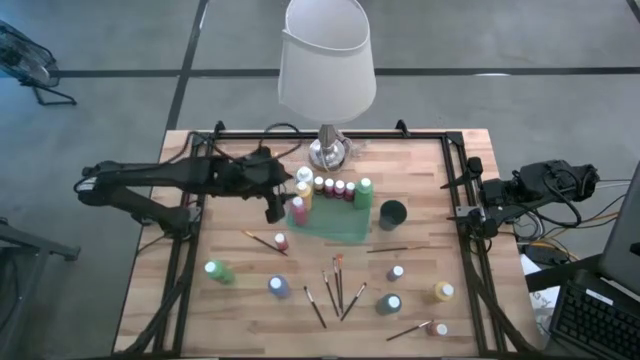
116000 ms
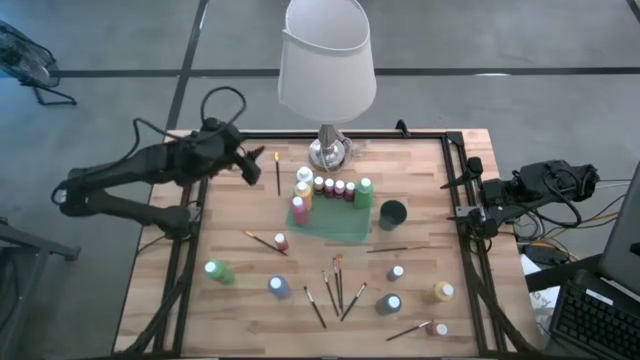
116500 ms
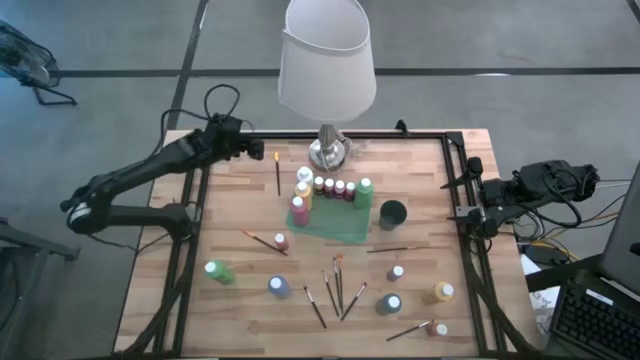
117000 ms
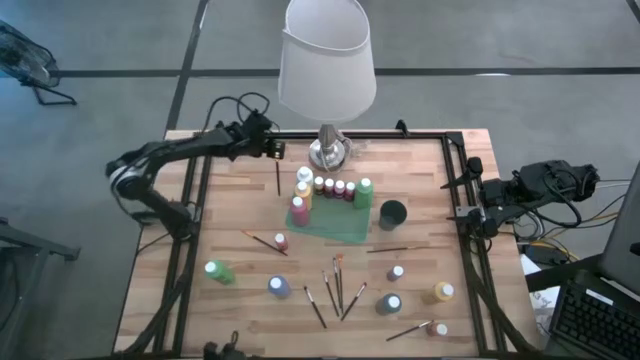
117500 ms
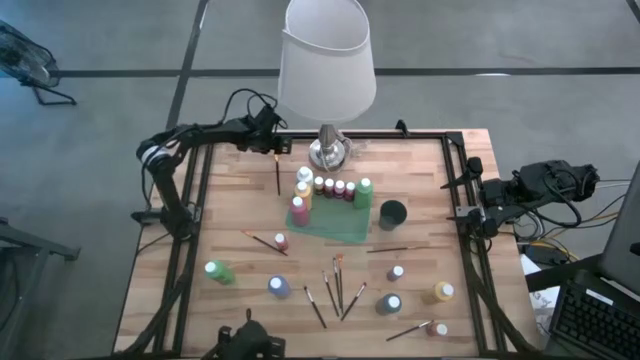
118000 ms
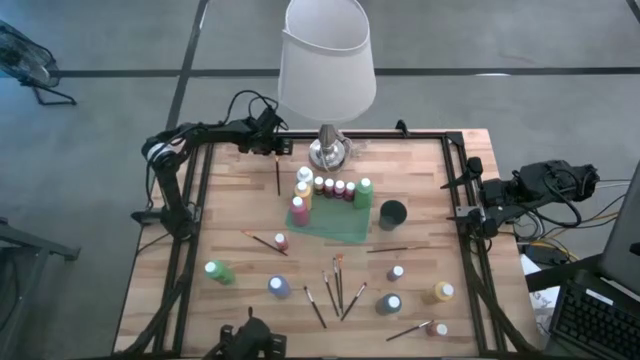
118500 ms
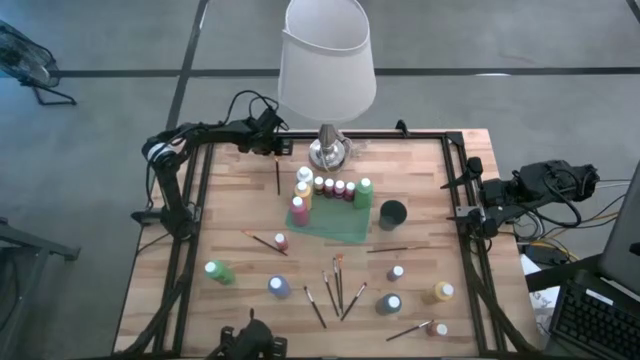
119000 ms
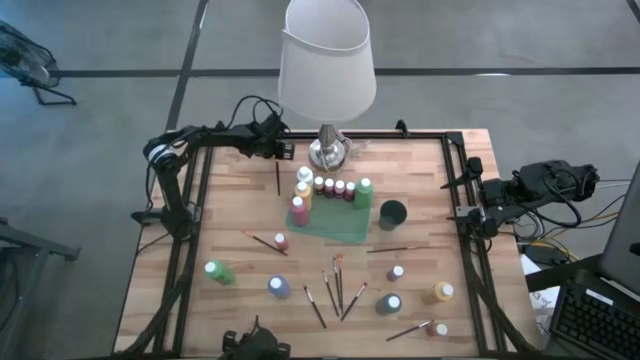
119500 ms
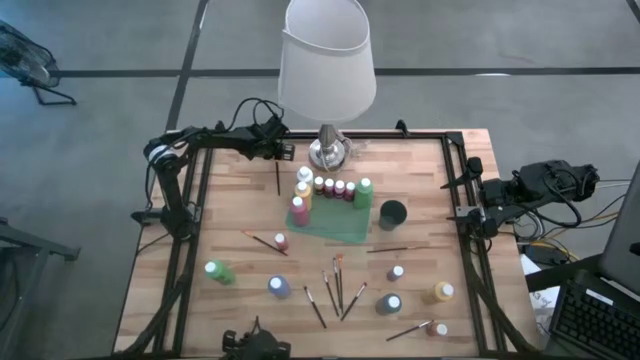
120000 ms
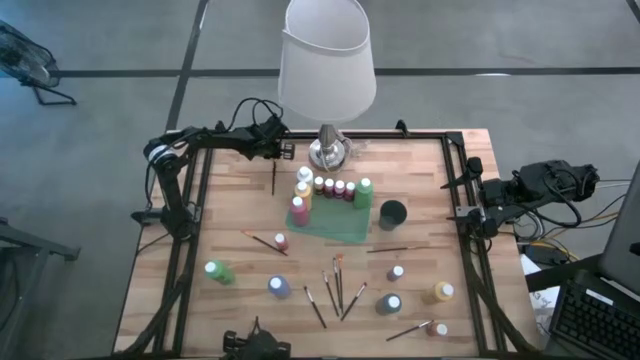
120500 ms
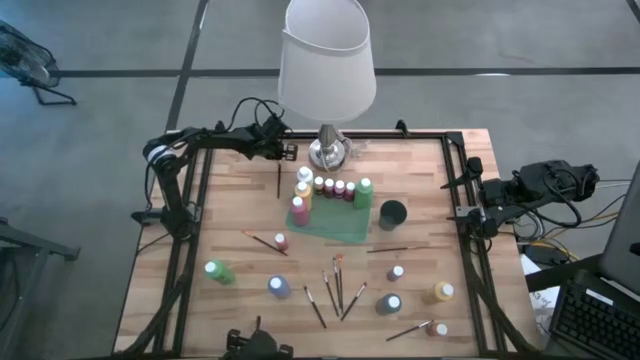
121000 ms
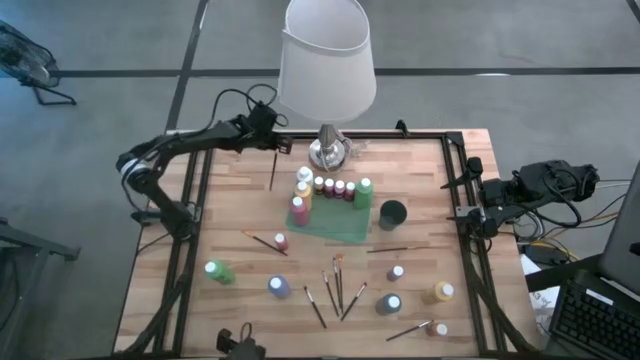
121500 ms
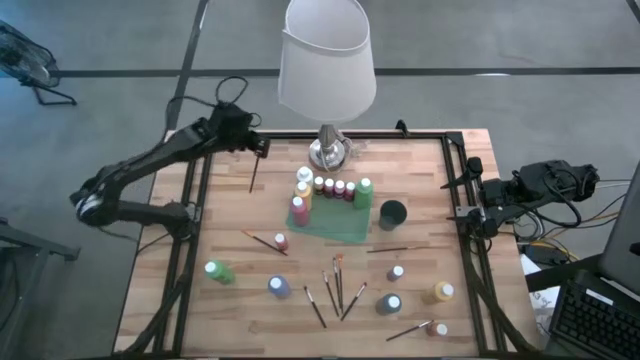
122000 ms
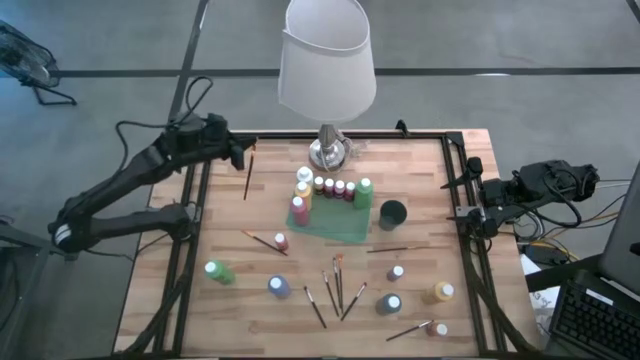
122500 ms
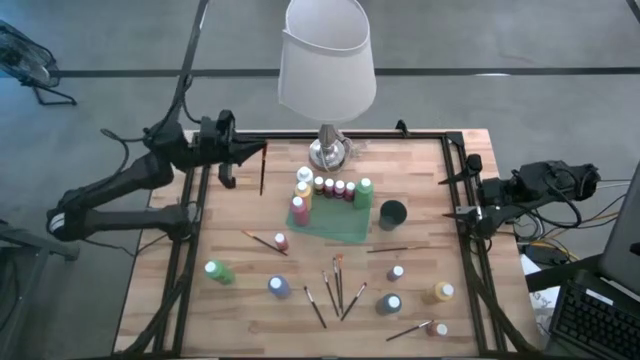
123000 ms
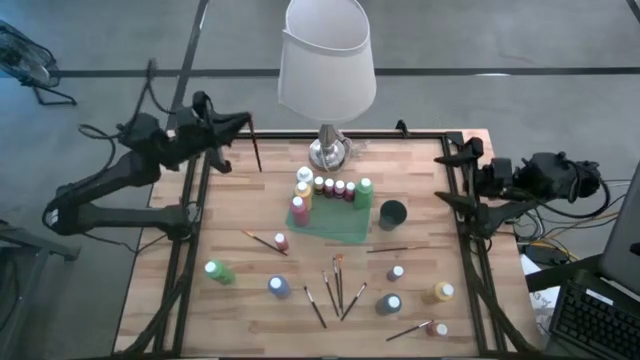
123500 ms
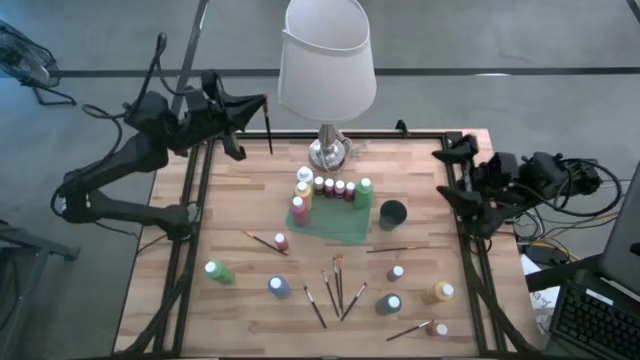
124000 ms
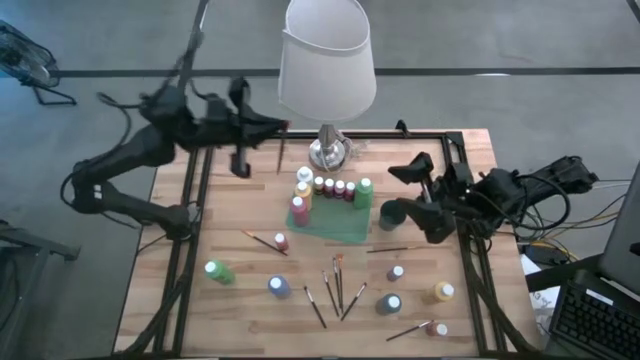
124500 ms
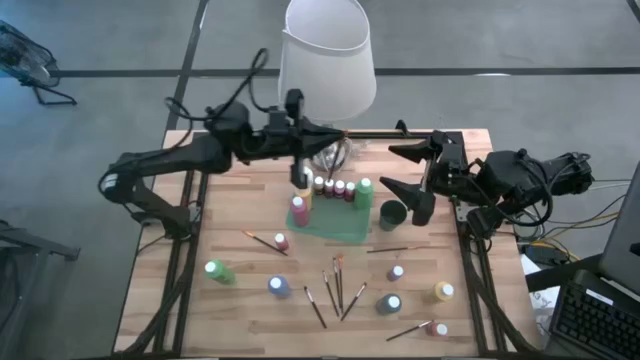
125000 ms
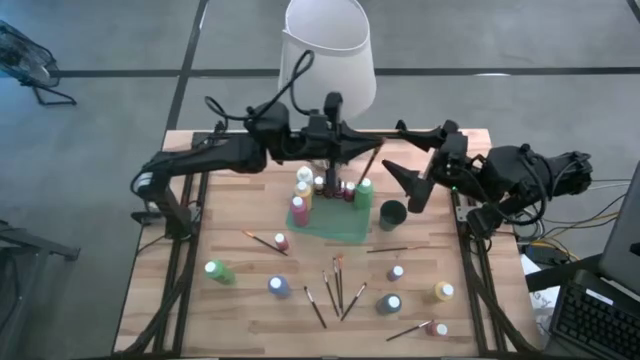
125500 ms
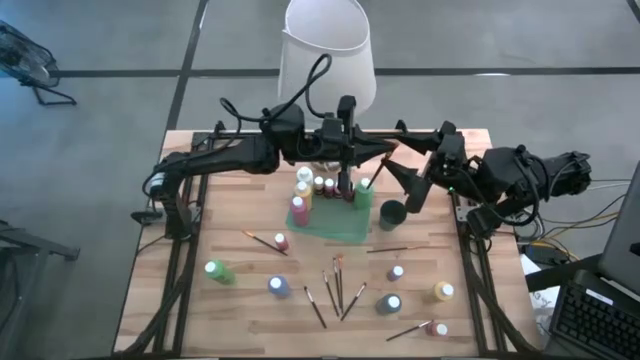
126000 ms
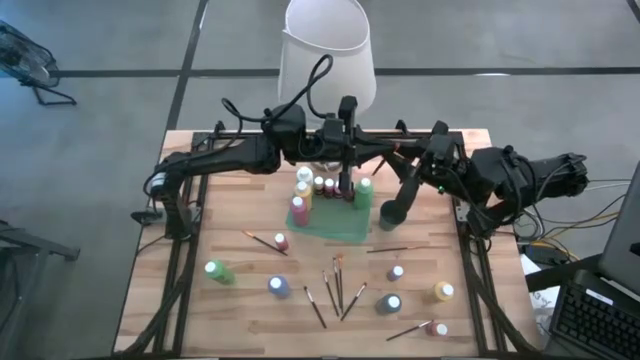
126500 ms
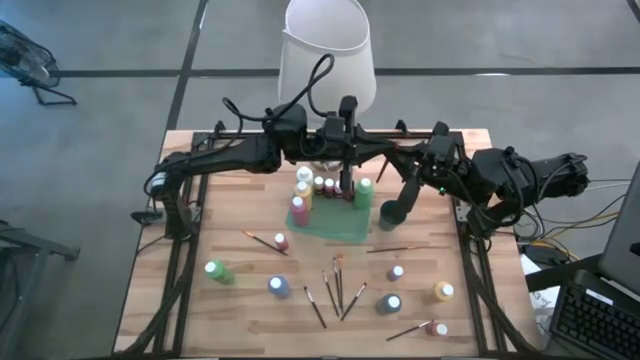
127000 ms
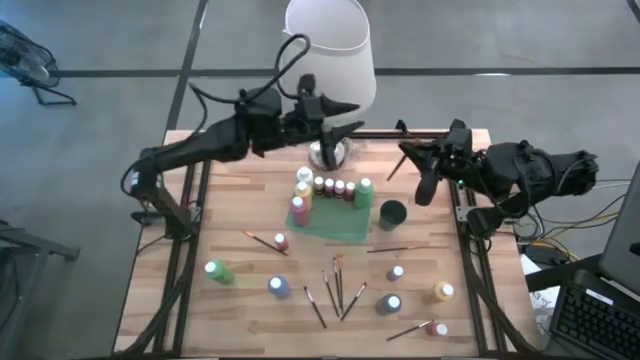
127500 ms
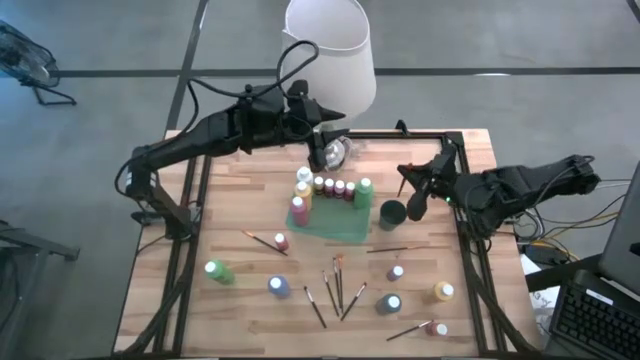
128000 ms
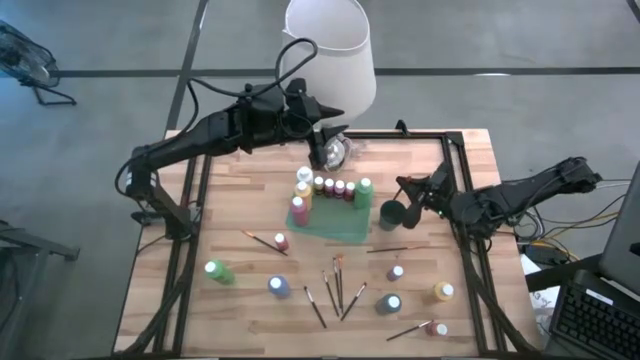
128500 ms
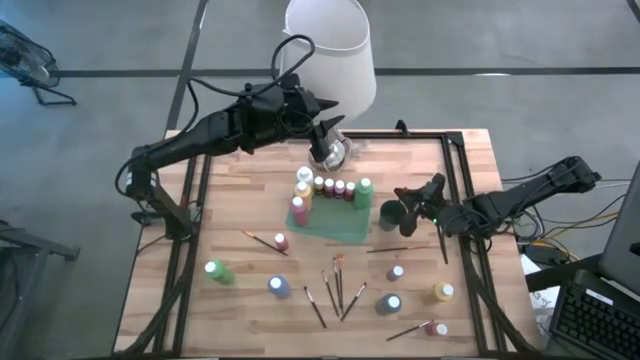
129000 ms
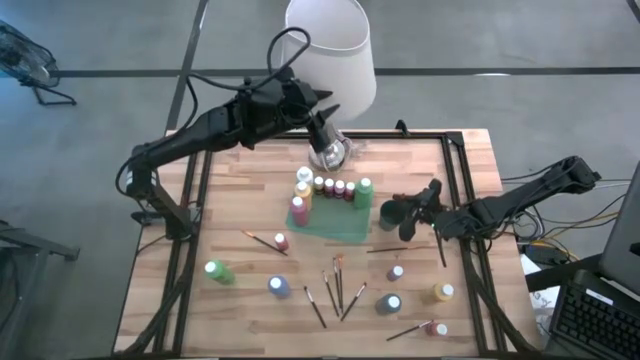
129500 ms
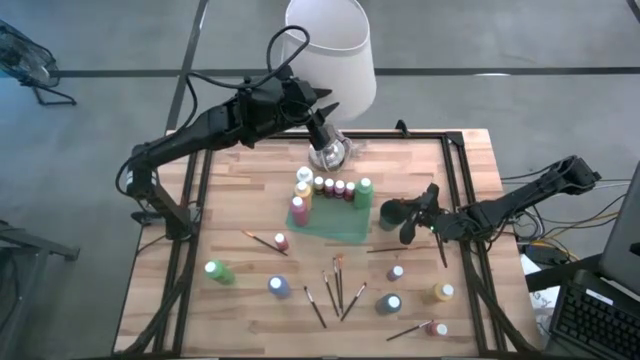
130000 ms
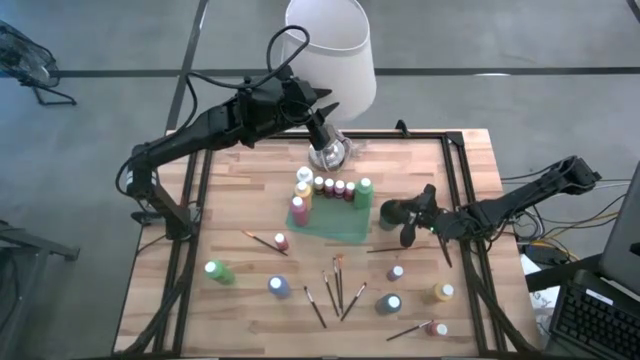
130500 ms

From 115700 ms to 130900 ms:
Task: Pick & Place Paint Supplies
Put the orange paint brush into the black cup

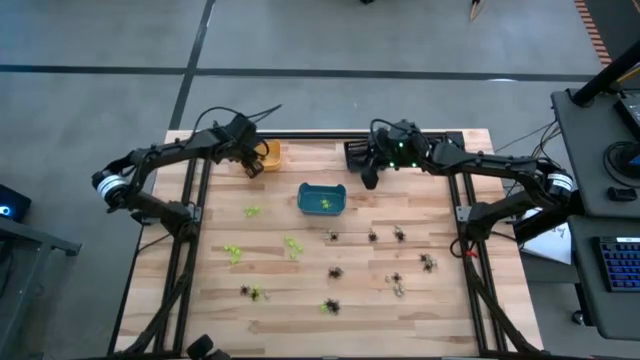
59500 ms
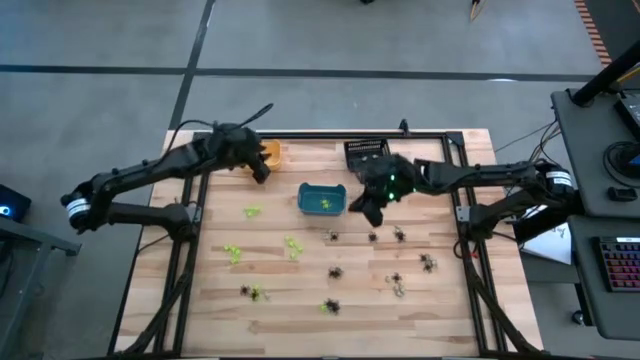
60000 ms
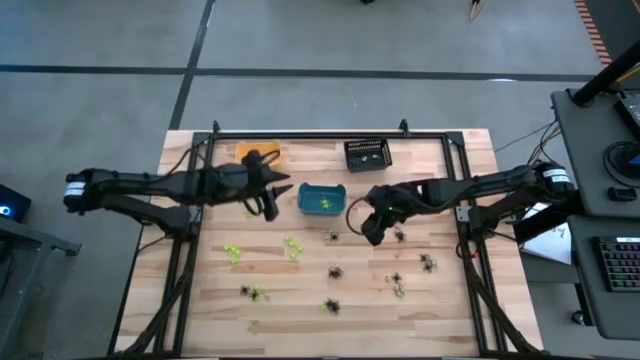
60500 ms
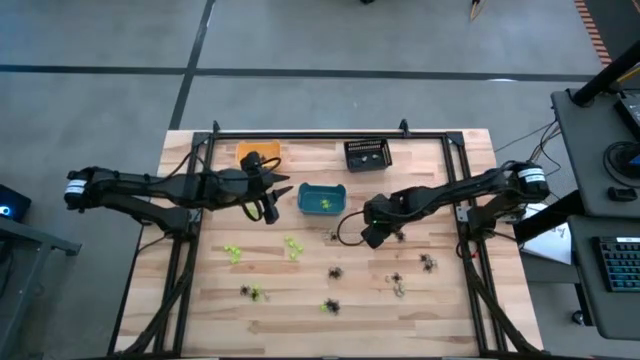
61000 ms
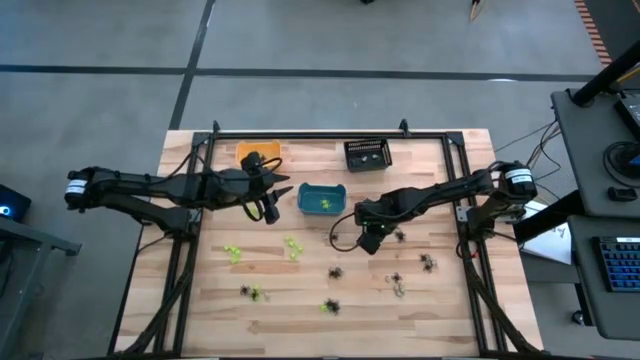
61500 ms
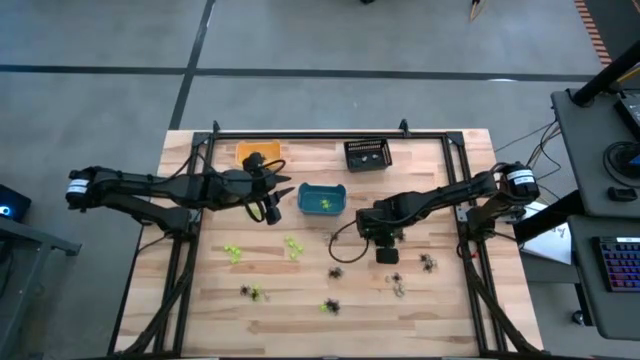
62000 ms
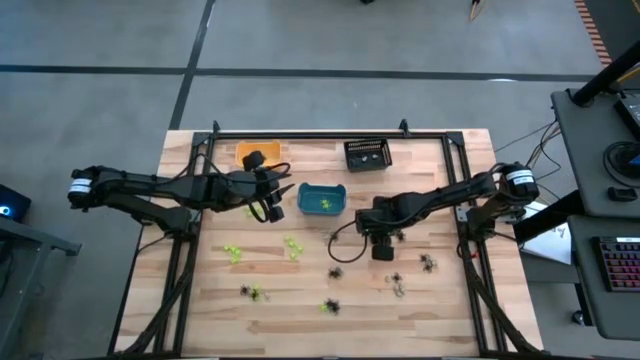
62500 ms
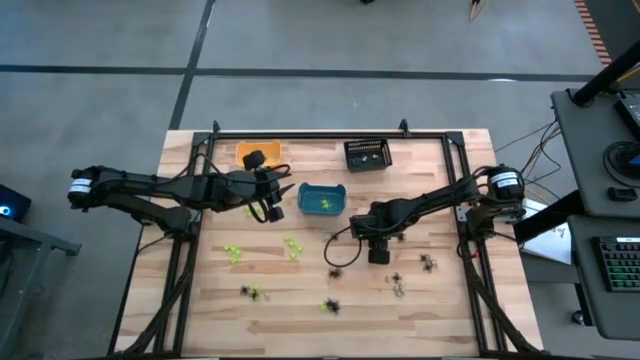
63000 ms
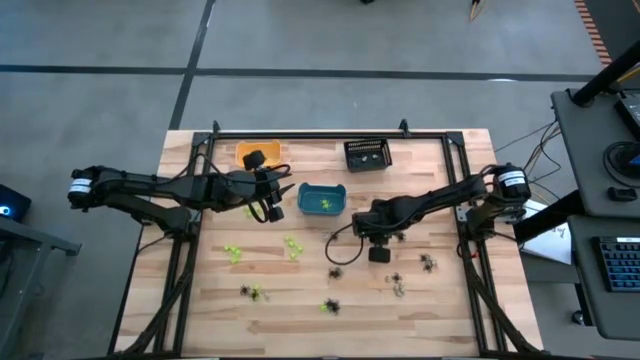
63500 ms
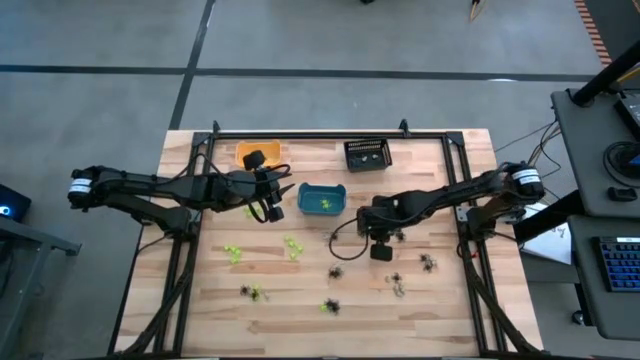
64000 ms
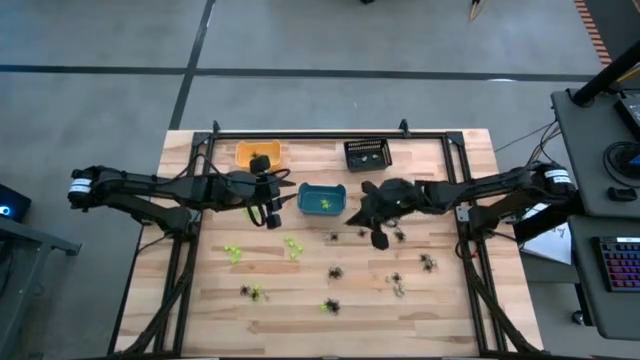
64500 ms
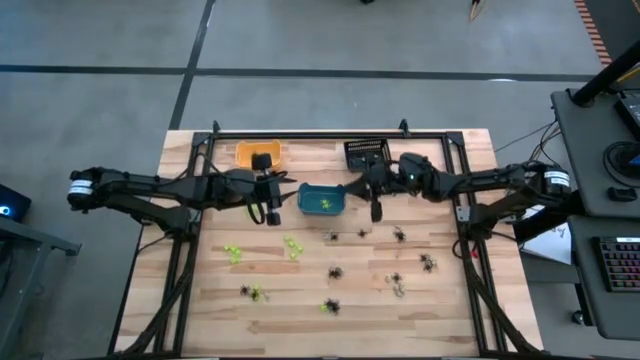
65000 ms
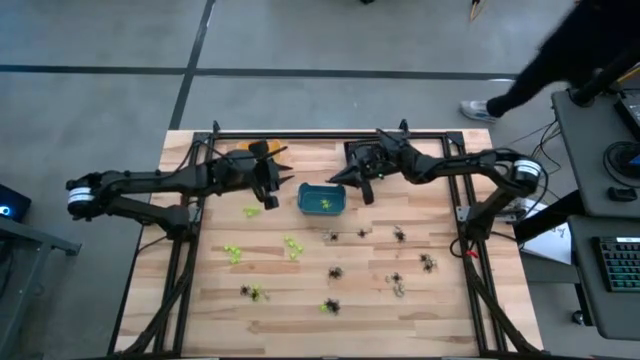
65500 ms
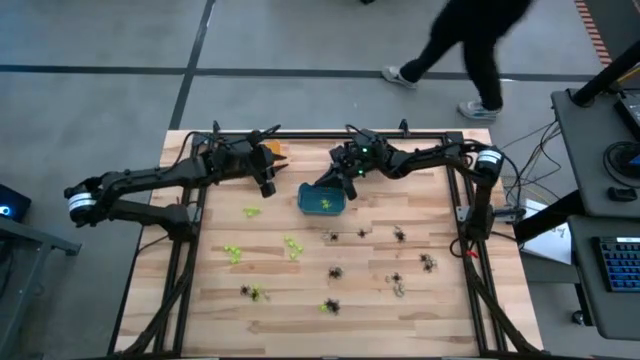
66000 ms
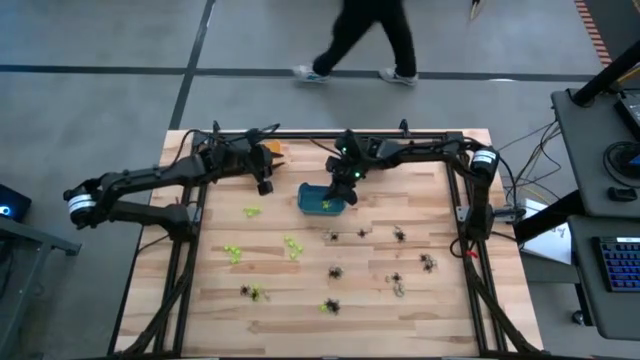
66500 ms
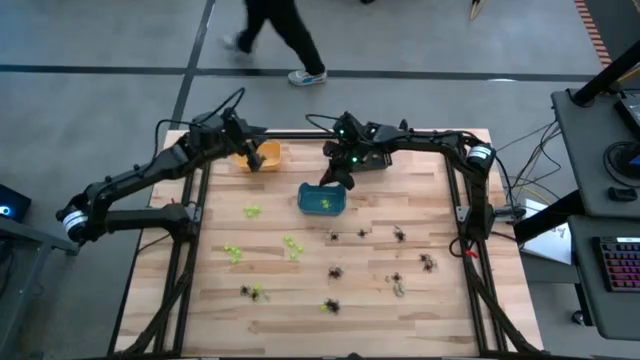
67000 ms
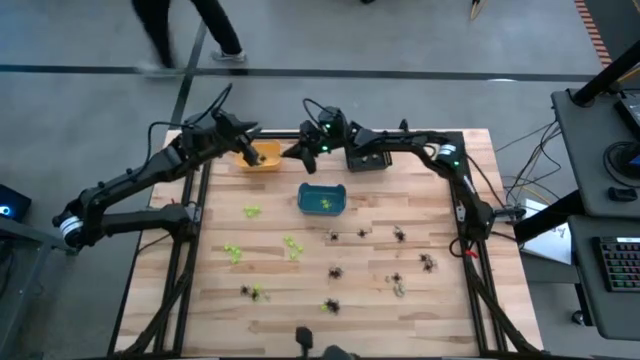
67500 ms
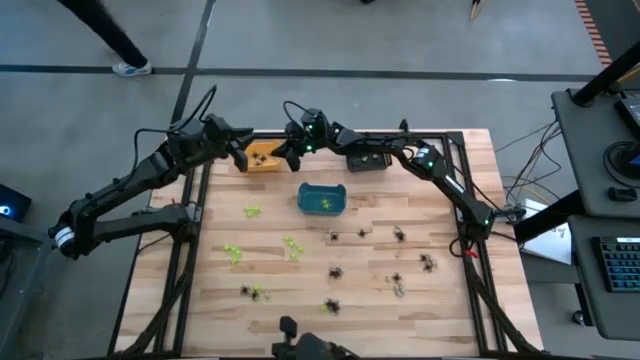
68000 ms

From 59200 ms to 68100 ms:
Task: Sort Halloween decoration
Put the black spider toy into the yellow bin
